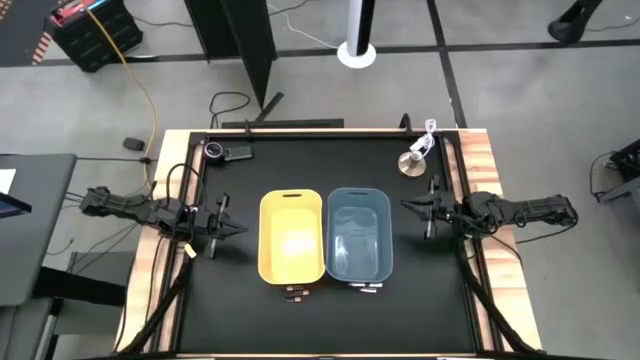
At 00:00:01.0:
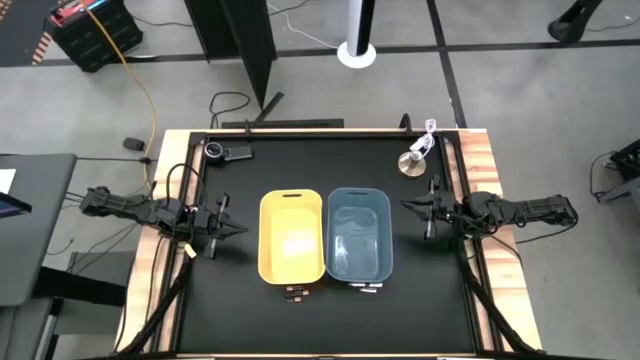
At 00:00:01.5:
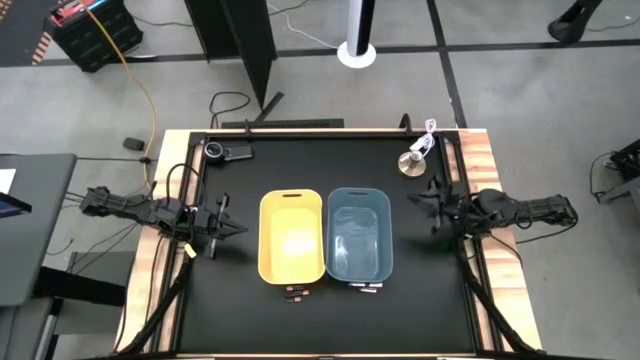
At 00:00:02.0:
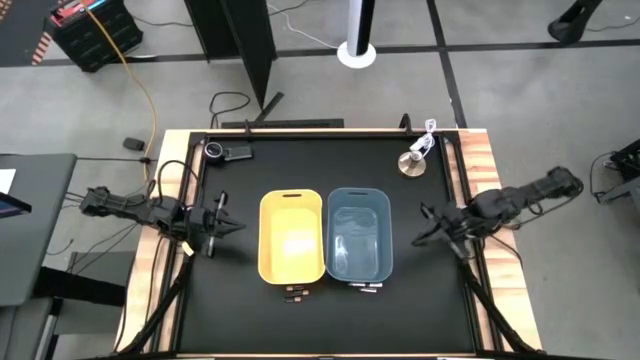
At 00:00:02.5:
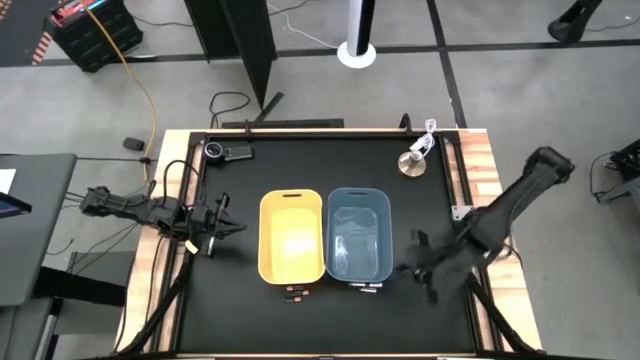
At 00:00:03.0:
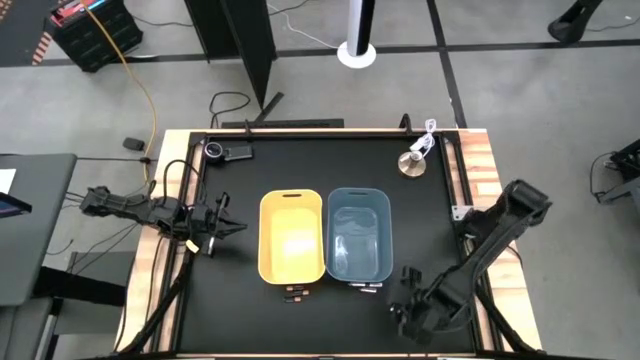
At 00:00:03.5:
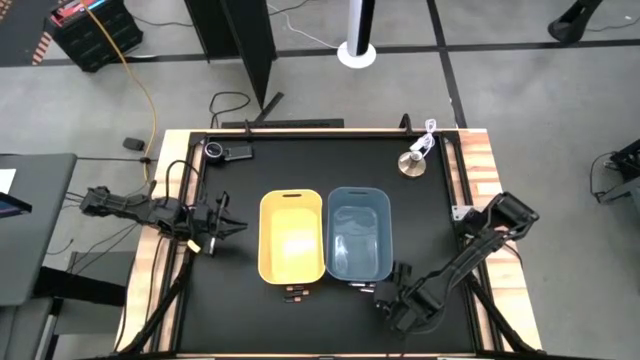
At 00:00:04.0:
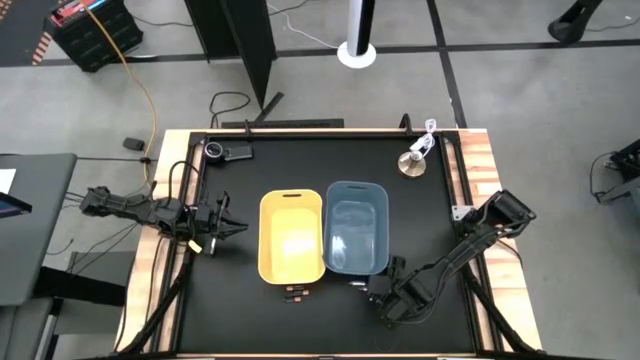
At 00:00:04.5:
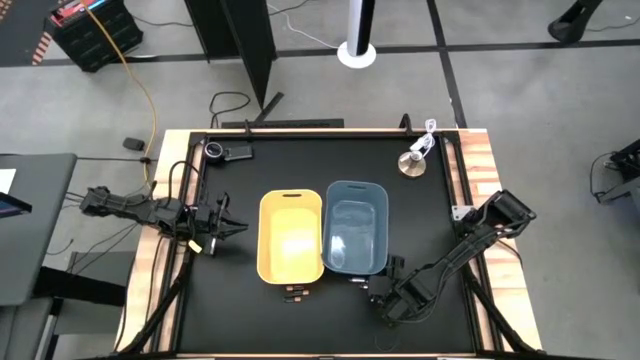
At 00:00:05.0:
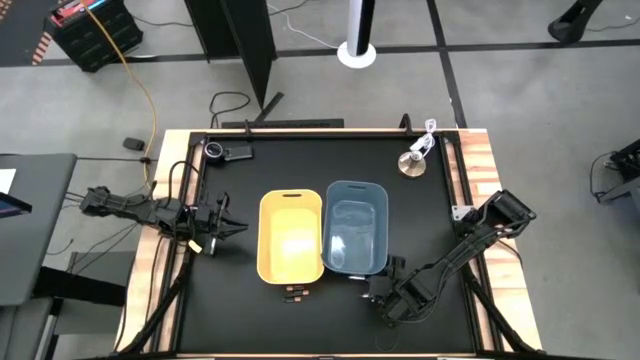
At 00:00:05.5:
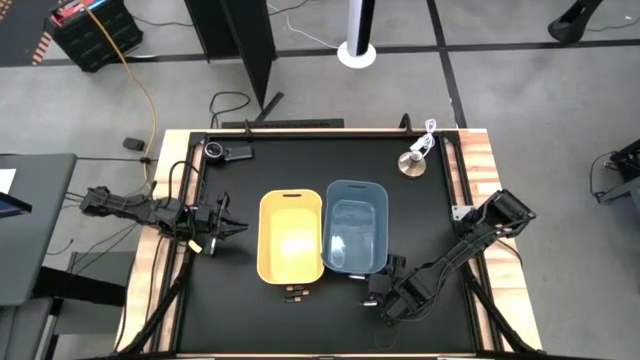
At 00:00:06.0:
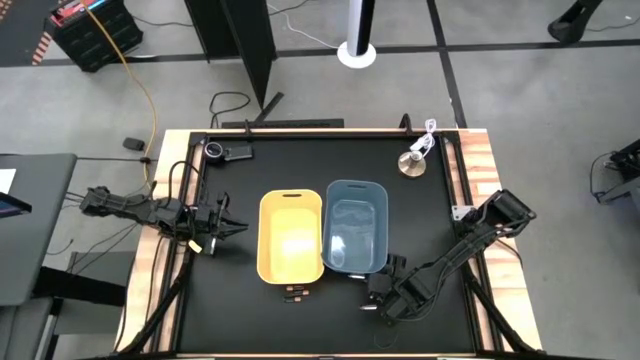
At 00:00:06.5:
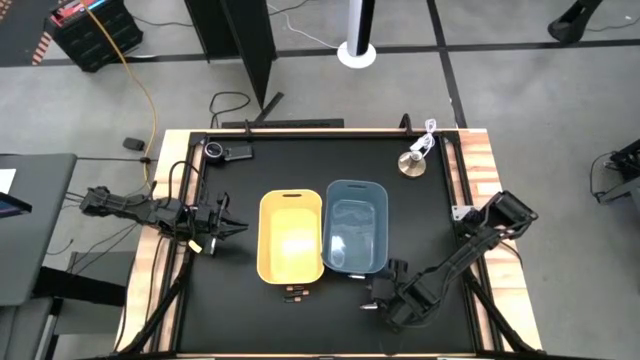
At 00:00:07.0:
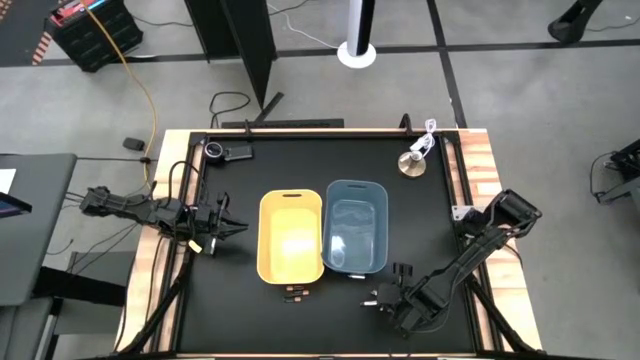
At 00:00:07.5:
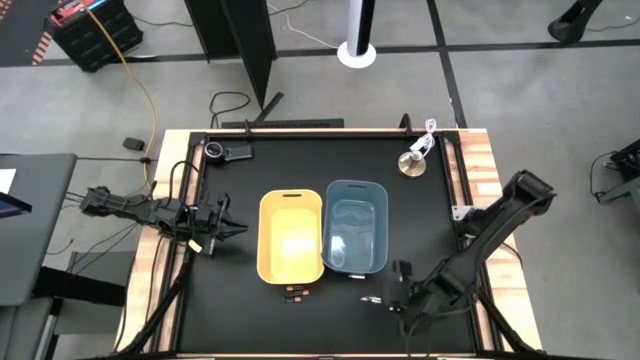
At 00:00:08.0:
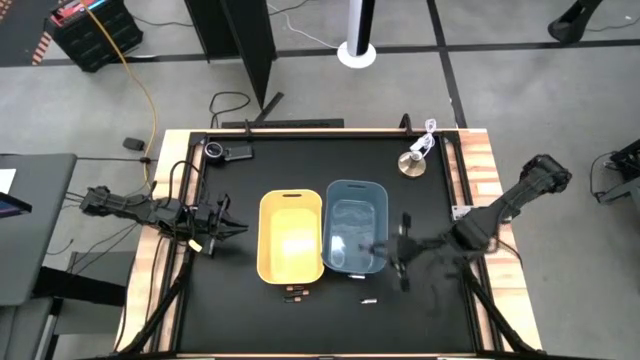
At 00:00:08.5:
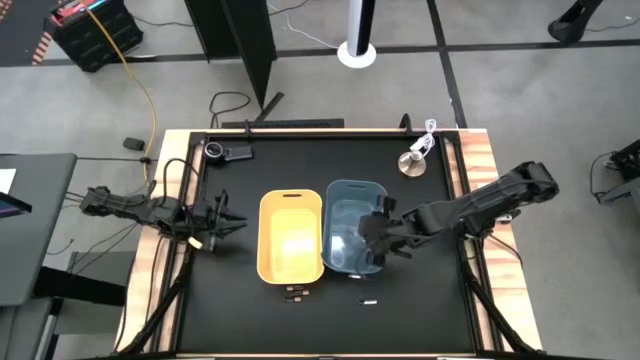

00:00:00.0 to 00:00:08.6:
Task: Sort batteries
Put the top right silver battery into the blue bin

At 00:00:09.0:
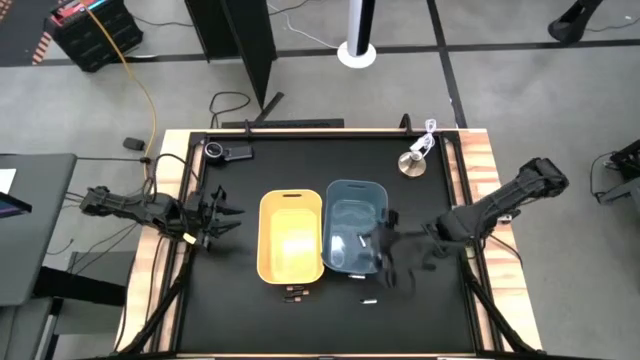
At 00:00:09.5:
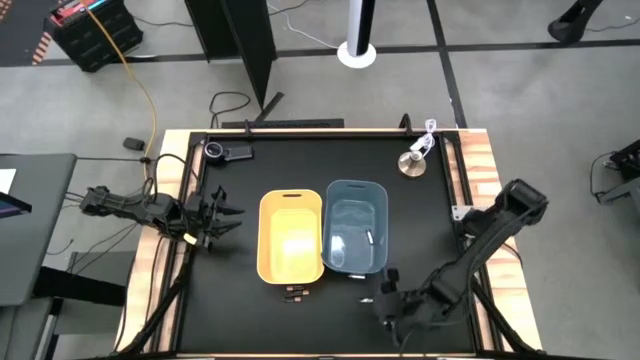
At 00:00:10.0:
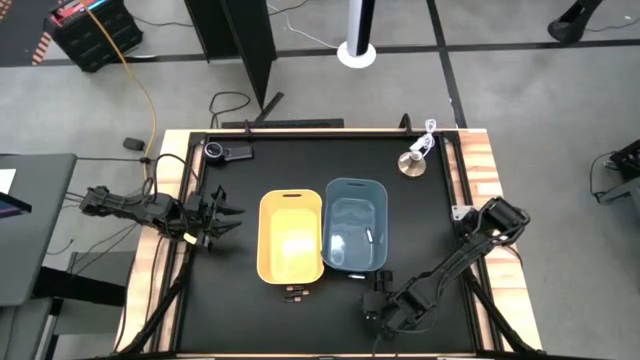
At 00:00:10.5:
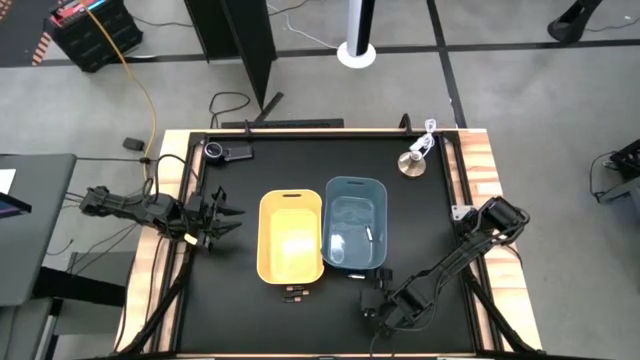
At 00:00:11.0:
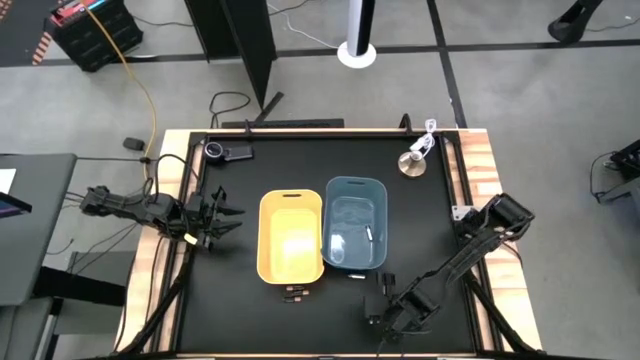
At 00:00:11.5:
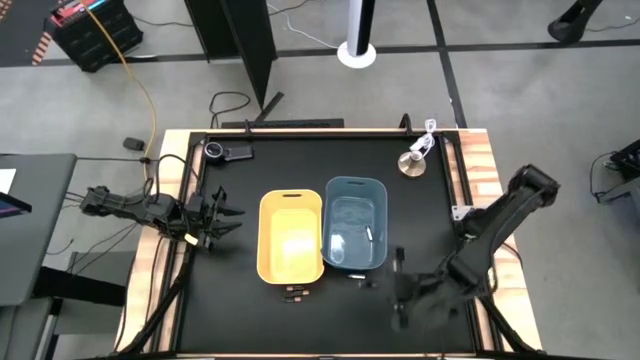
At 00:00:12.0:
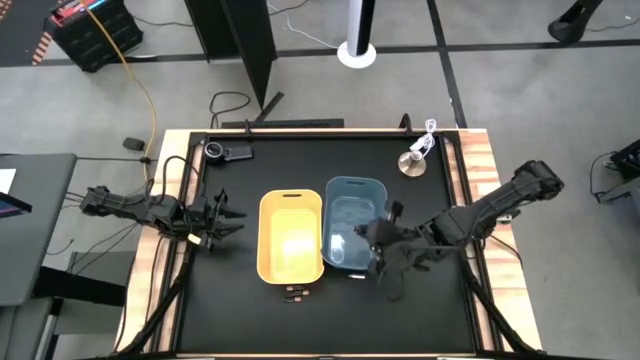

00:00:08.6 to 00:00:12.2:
Put the bottom silver battery into the blue bin

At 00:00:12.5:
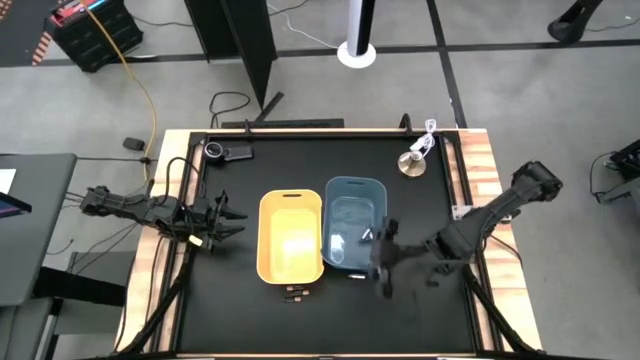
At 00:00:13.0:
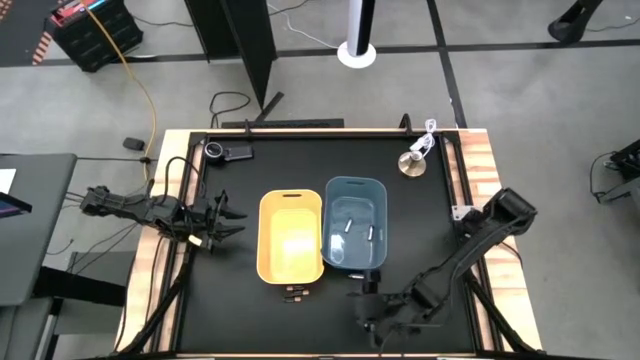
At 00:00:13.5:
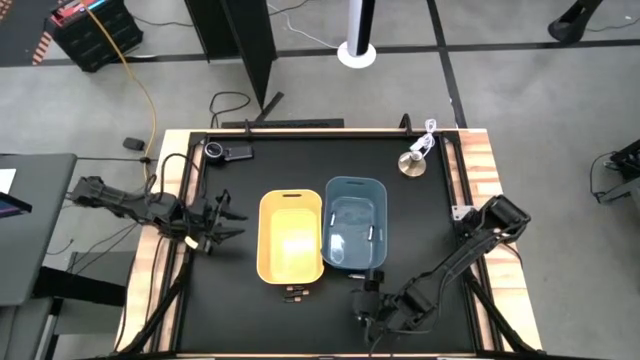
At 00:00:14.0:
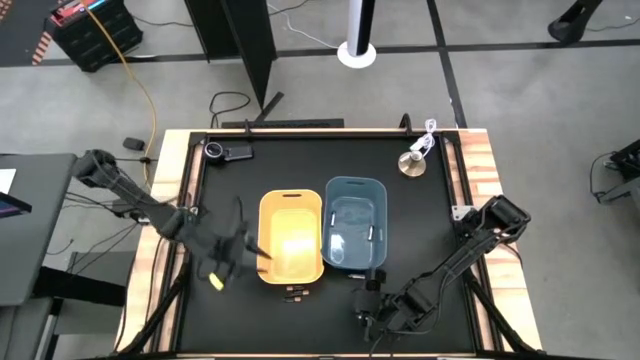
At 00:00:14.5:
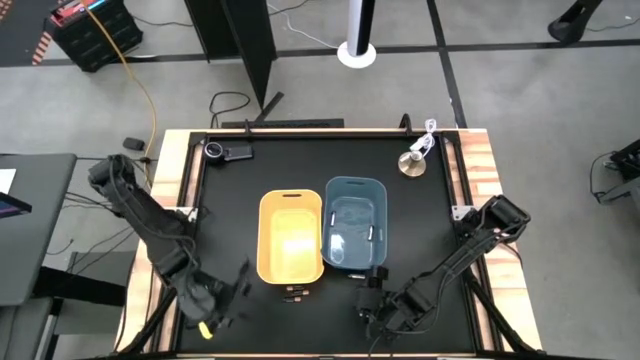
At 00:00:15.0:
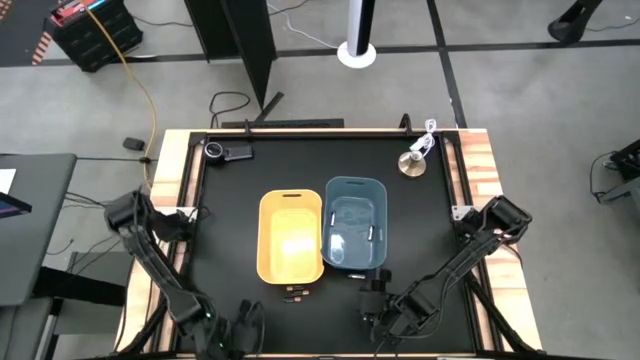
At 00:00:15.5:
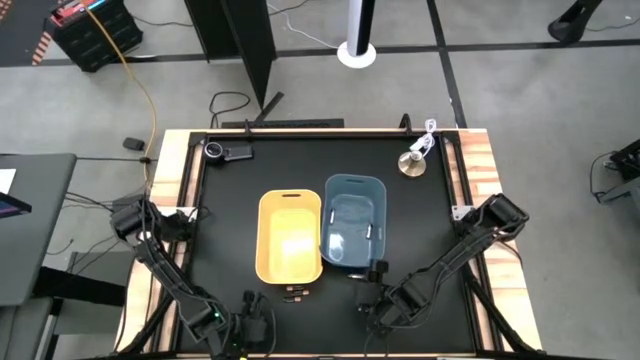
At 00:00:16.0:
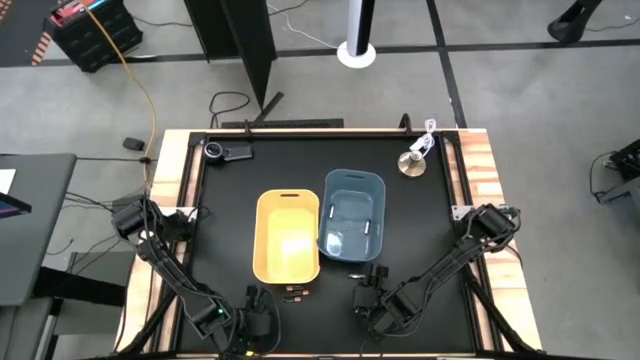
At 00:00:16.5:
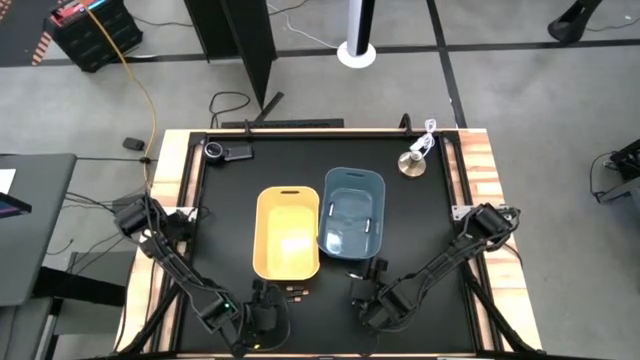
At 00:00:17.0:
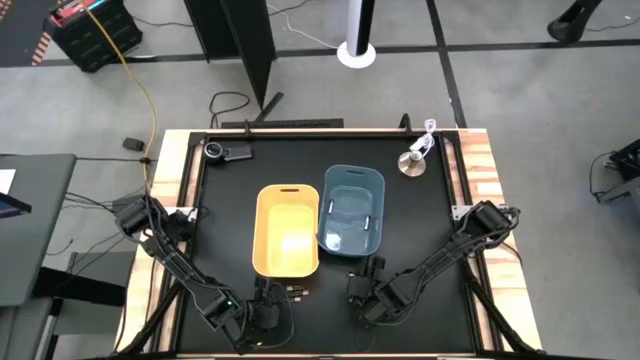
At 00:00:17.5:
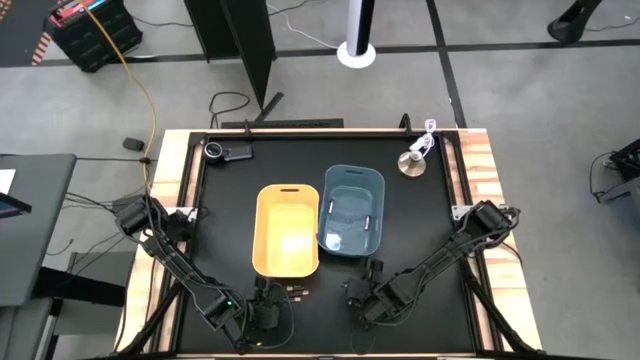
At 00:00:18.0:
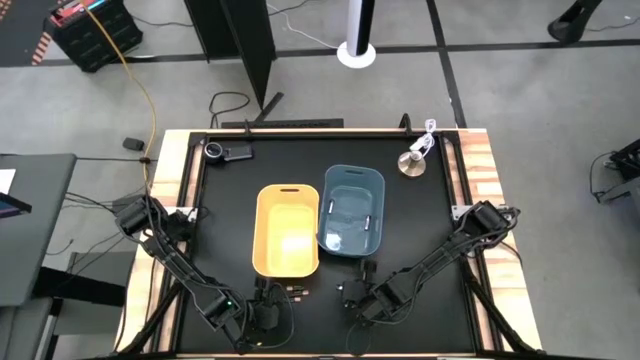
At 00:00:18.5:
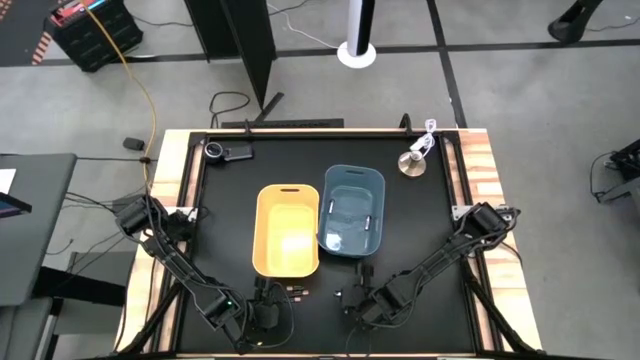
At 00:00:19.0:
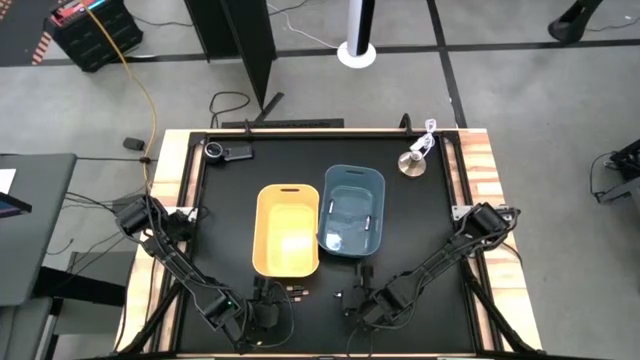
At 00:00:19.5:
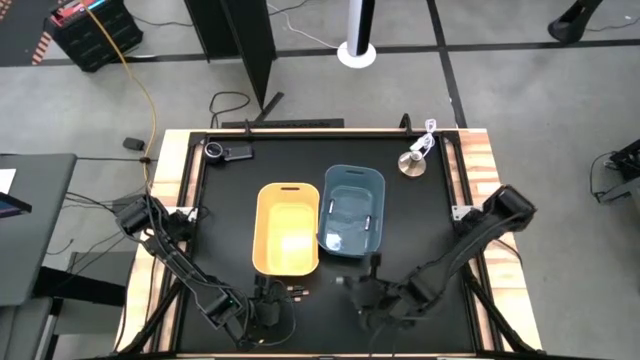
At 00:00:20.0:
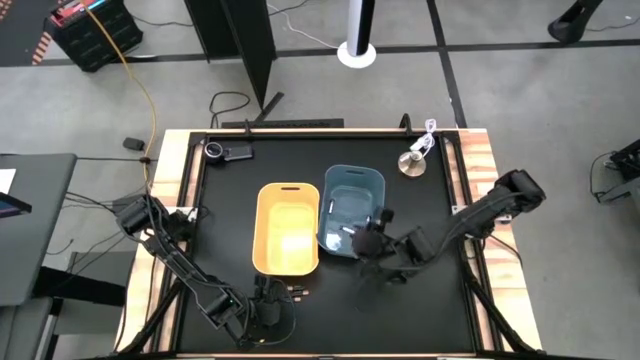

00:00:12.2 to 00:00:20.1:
Put the silver battery into the blue bin

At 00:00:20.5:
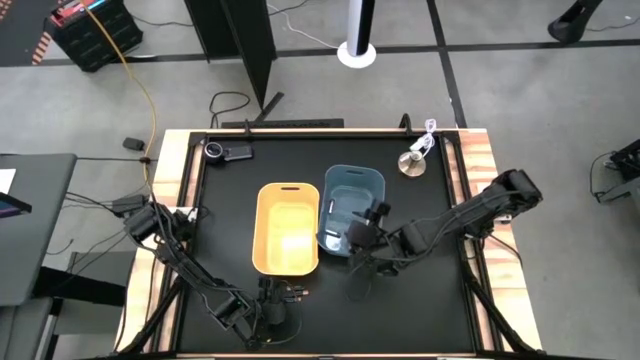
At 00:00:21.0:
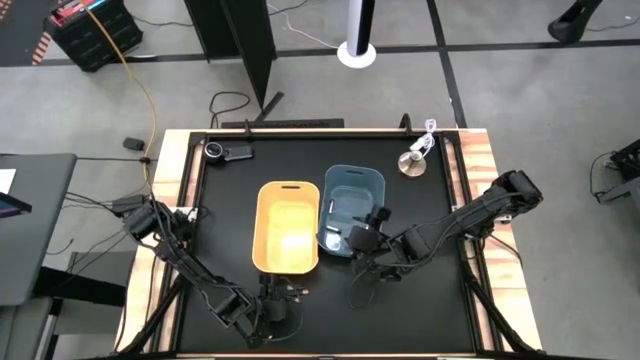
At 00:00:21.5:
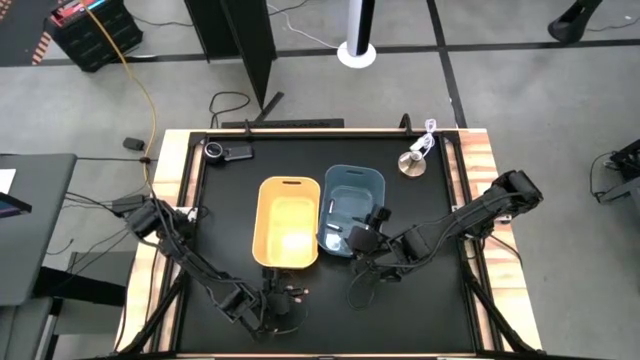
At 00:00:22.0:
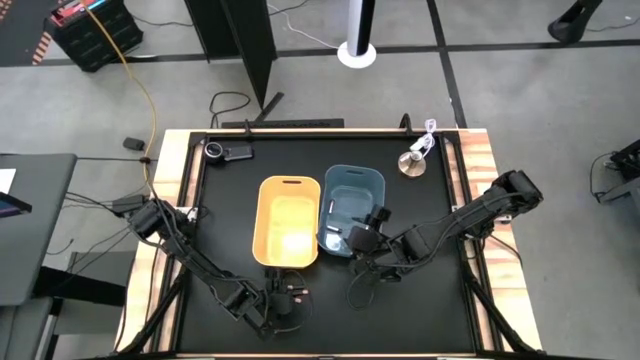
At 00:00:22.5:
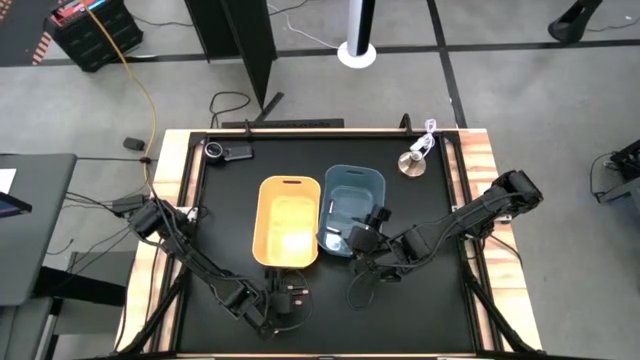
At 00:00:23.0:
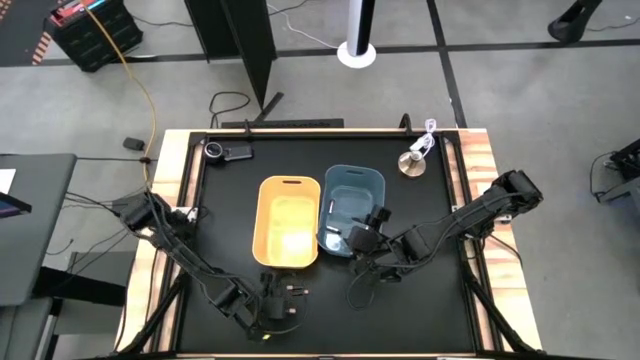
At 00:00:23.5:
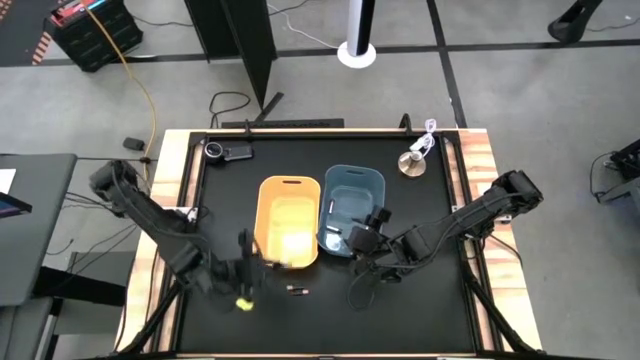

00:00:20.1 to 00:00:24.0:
Put the bottom black battery into the yellow bin
